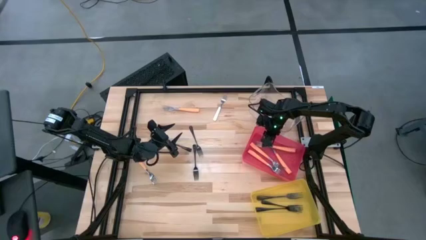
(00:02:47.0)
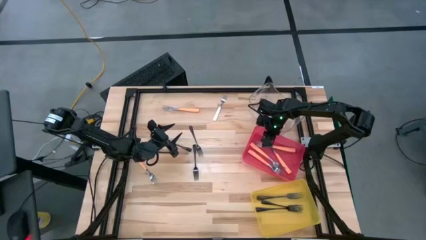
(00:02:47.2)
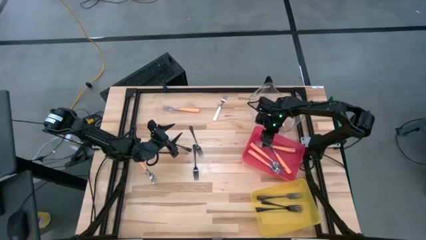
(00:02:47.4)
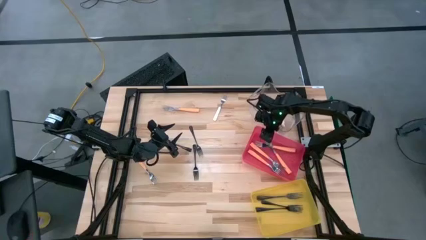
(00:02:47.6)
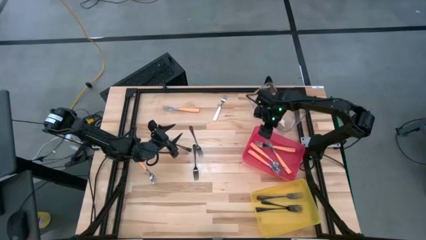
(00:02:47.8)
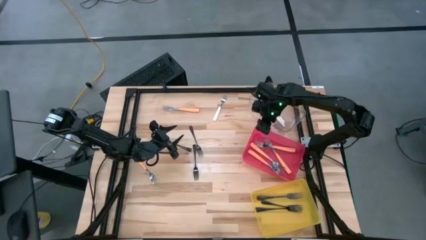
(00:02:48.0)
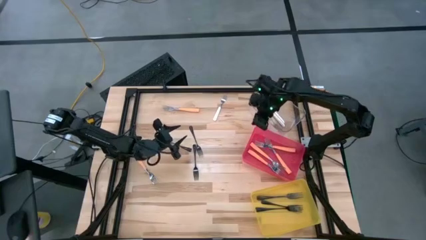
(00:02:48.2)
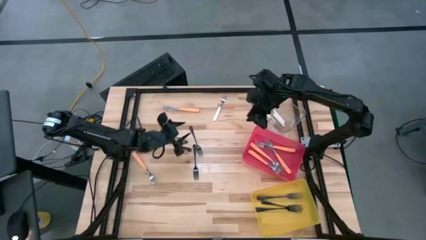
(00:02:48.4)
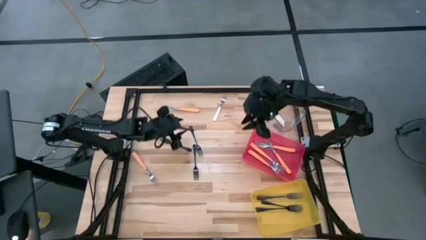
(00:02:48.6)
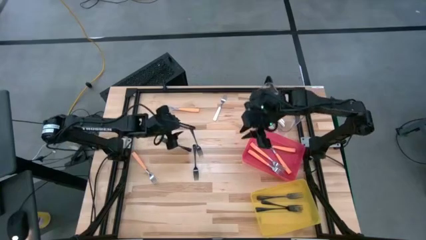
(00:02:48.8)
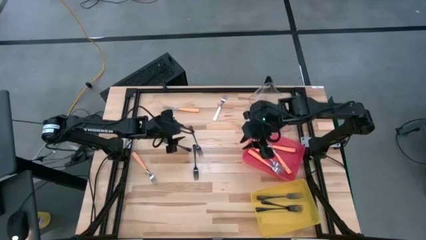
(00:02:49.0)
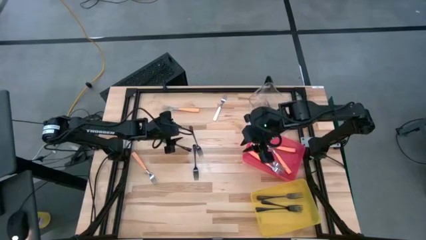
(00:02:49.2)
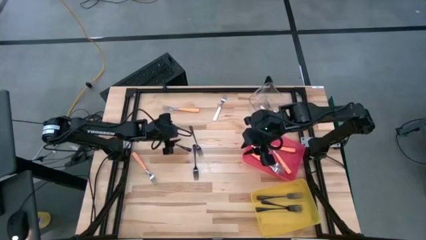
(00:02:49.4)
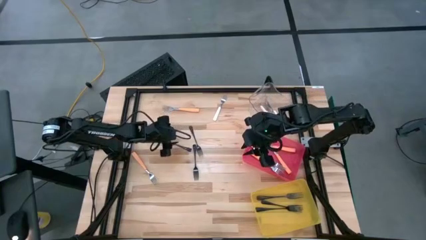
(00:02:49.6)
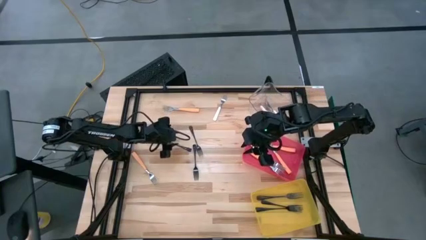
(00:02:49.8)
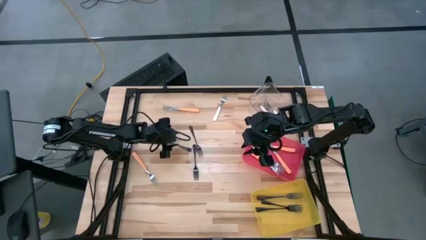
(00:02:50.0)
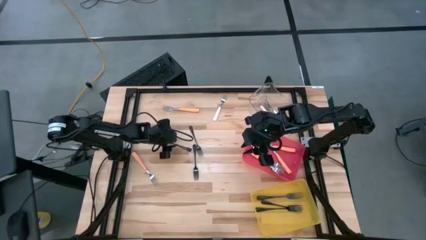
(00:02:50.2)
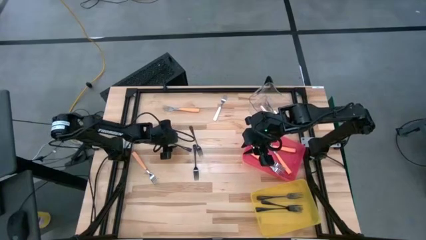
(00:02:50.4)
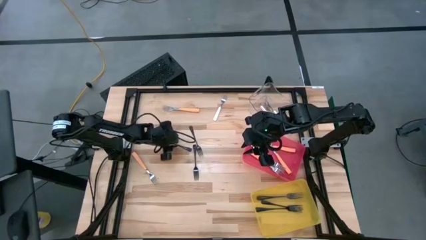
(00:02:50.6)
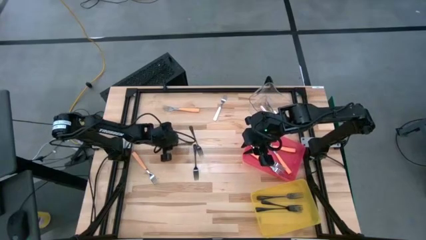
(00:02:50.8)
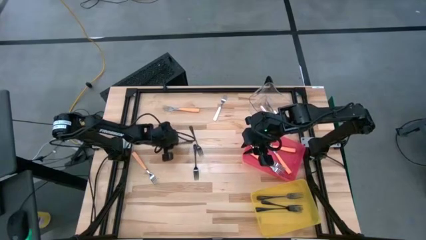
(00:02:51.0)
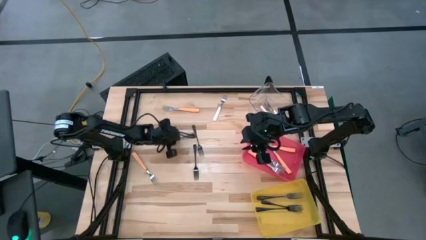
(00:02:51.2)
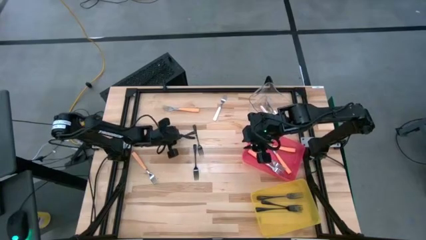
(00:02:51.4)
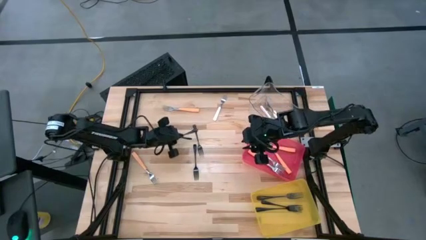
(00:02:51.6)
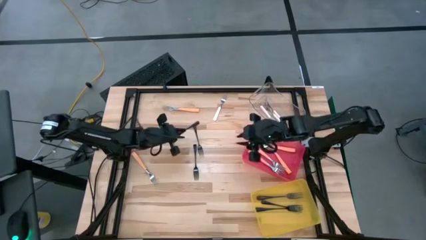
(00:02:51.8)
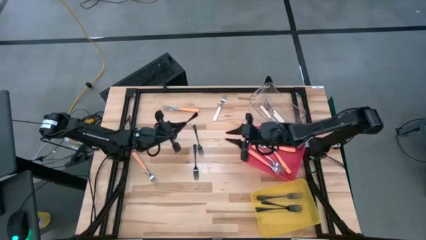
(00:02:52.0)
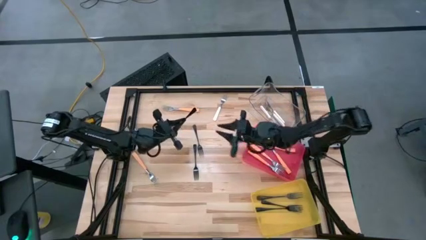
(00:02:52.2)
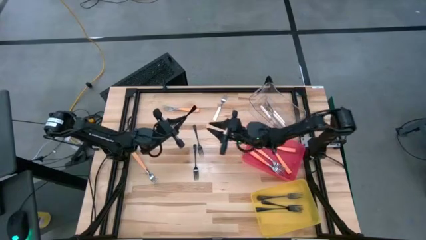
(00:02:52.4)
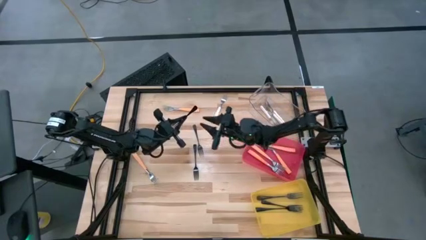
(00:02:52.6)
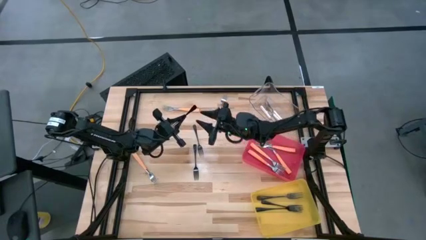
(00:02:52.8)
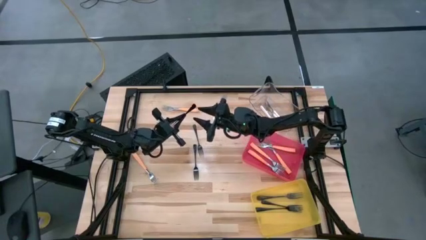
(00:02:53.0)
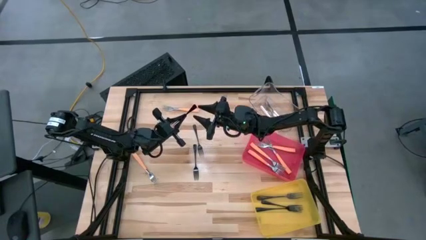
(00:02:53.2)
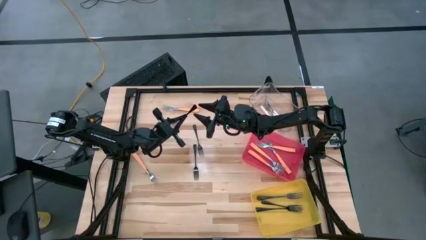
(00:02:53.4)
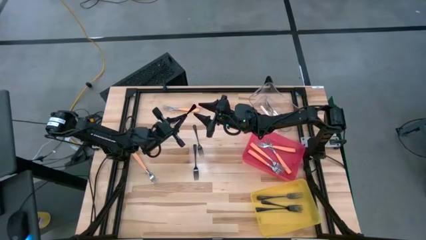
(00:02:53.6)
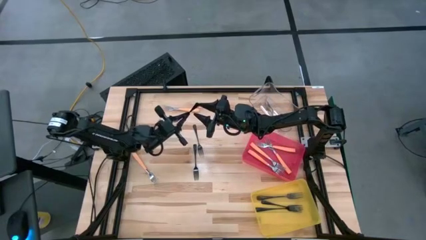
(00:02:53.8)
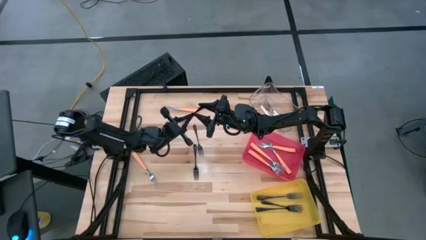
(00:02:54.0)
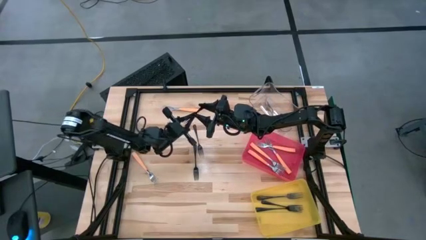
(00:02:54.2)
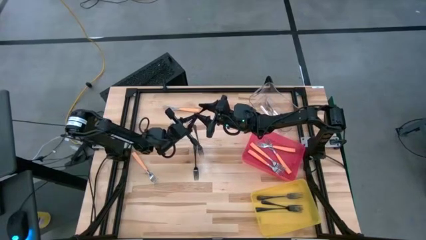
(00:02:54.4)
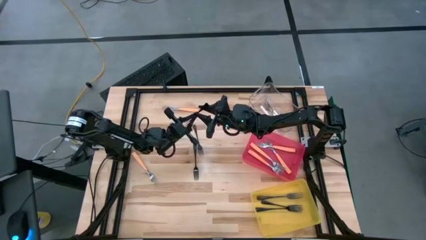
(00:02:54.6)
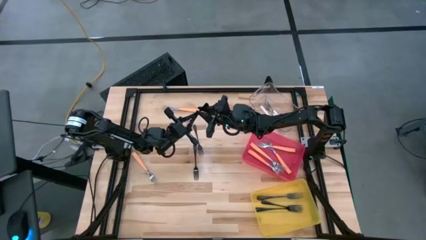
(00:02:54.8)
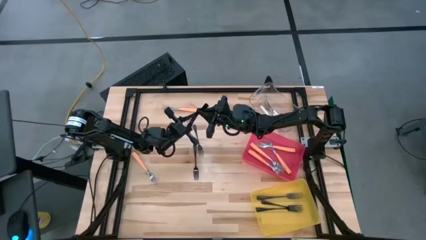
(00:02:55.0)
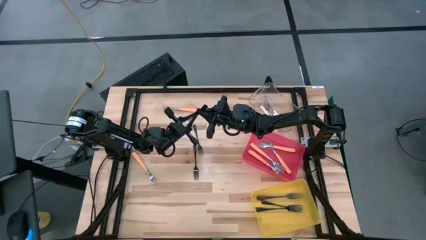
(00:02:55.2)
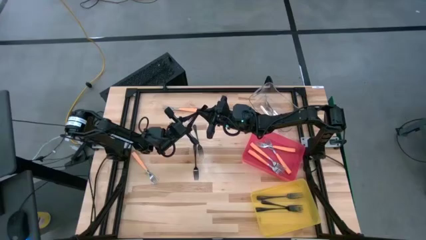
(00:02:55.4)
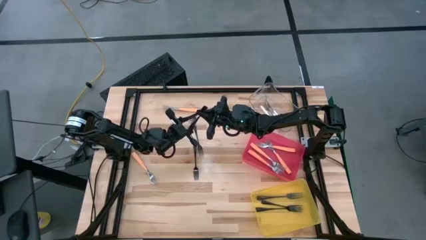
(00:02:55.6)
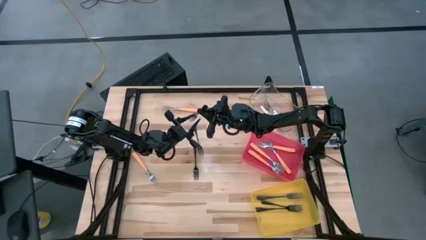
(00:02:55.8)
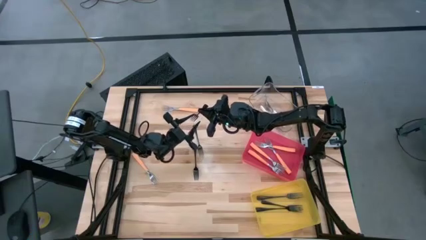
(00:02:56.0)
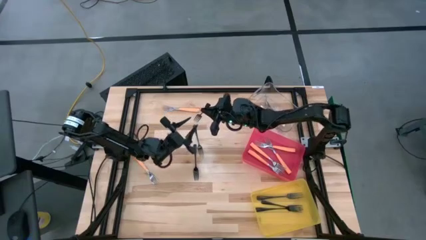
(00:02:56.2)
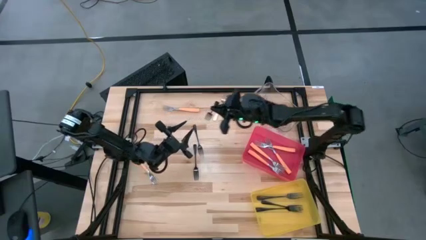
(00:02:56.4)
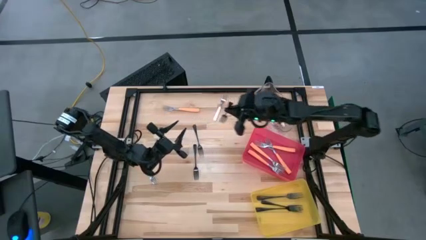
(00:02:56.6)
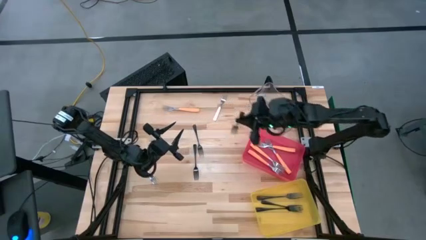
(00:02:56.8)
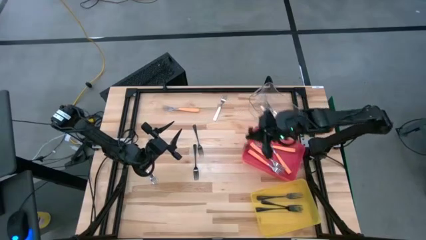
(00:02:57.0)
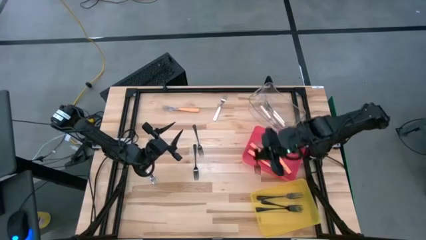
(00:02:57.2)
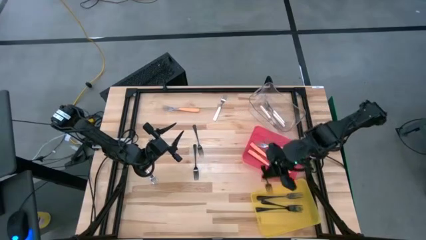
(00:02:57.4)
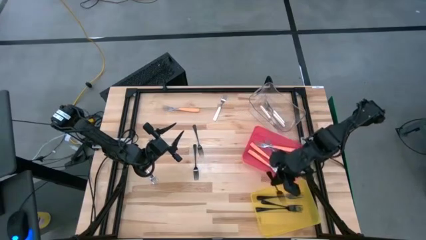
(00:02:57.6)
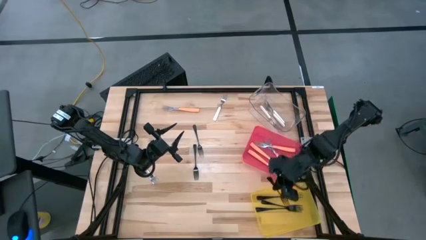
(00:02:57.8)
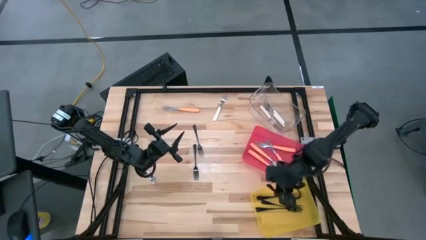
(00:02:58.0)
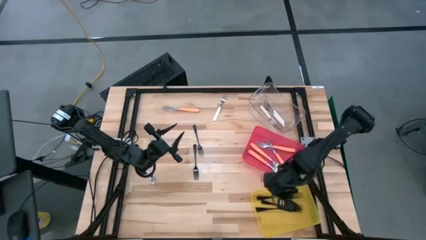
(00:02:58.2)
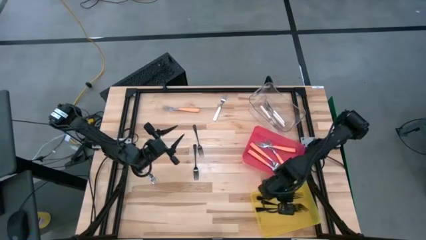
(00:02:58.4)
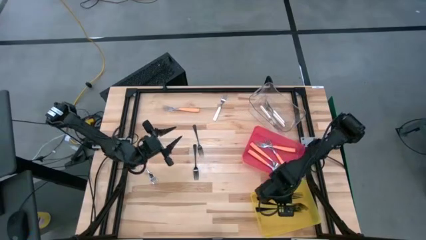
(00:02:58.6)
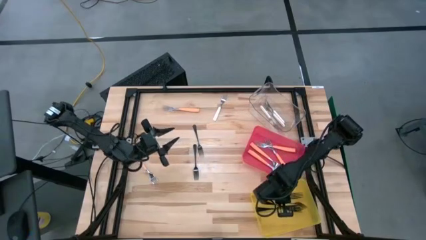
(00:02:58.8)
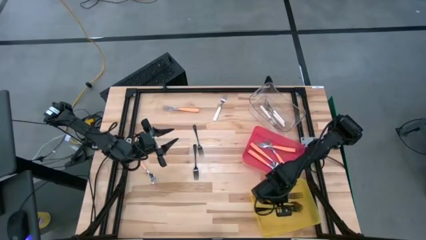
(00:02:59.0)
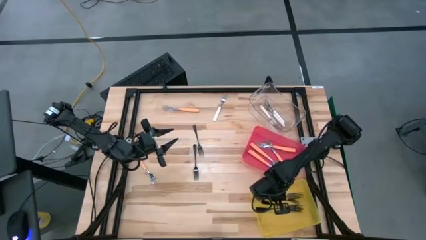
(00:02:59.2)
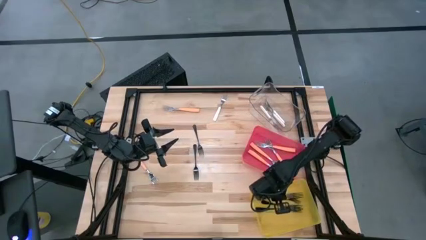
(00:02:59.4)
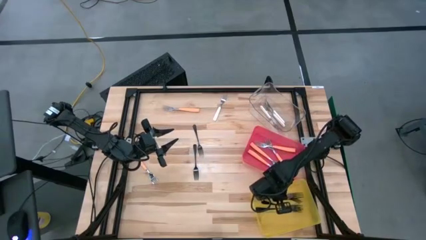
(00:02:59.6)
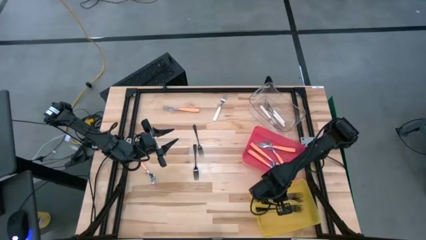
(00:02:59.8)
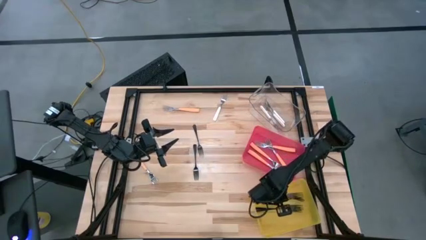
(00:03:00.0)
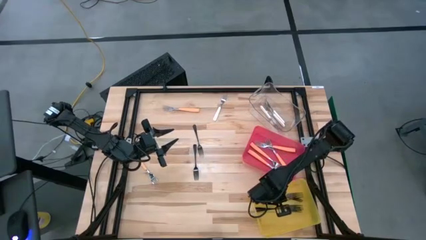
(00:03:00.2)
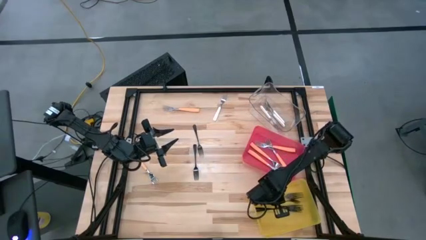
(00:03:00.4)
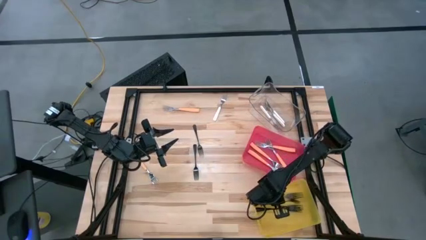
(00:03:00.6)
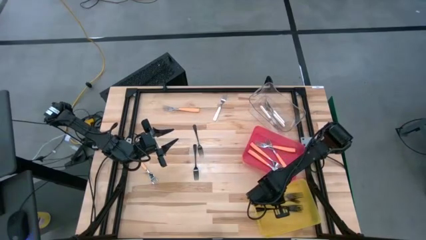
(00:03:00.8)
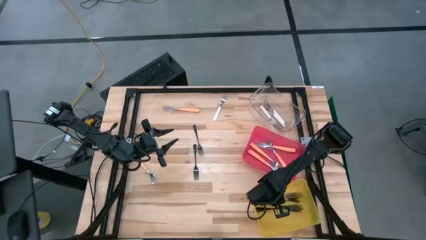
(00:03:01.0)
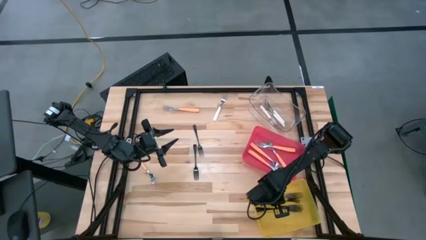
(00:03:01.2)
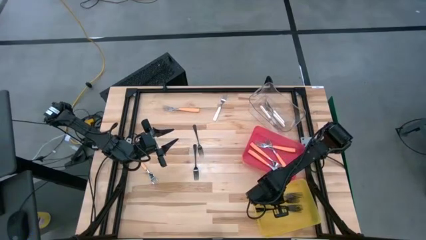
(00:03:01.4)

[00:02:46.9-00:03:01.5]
Task: Sort silverware by color (type)
Put the black fork into the yellow bin

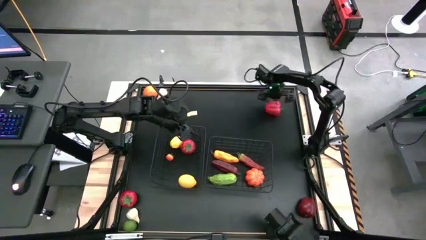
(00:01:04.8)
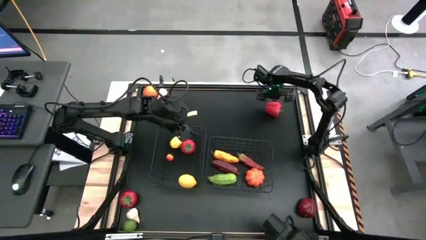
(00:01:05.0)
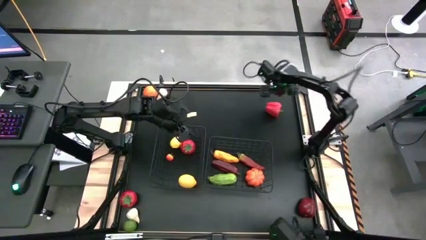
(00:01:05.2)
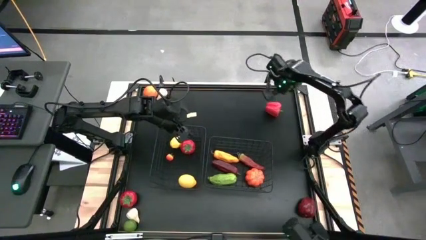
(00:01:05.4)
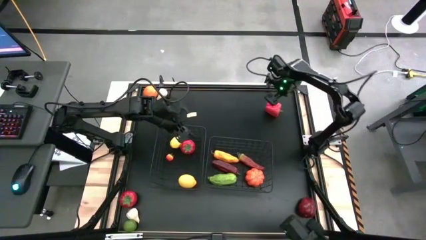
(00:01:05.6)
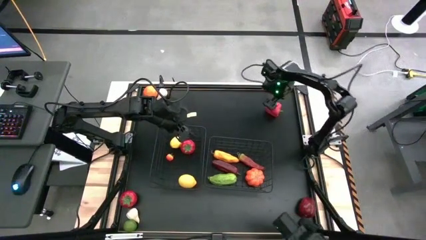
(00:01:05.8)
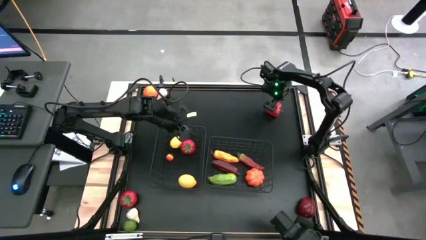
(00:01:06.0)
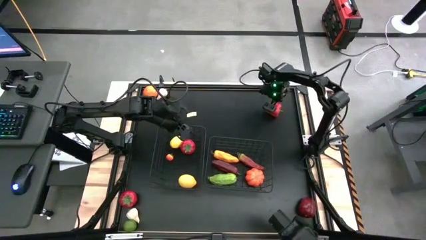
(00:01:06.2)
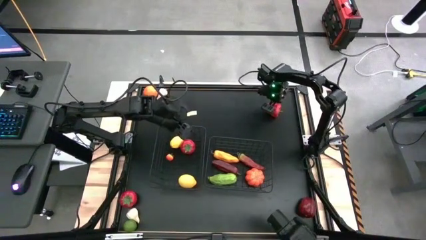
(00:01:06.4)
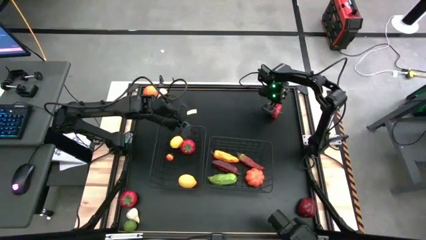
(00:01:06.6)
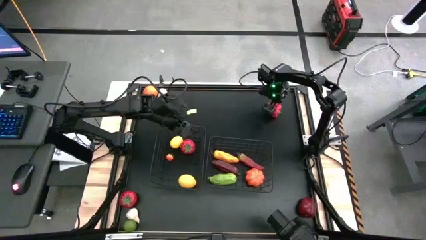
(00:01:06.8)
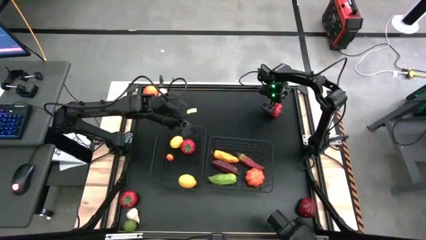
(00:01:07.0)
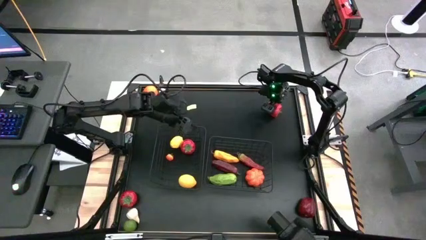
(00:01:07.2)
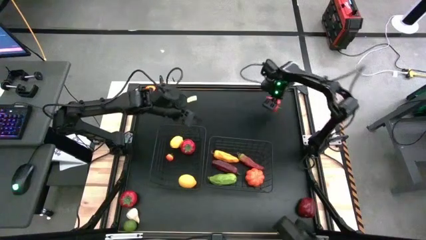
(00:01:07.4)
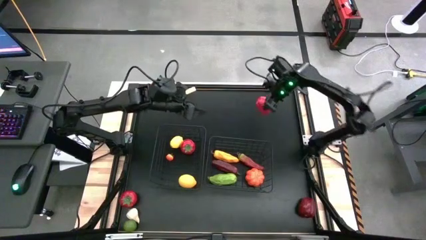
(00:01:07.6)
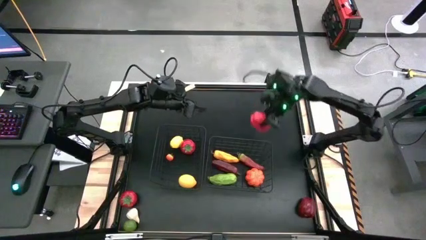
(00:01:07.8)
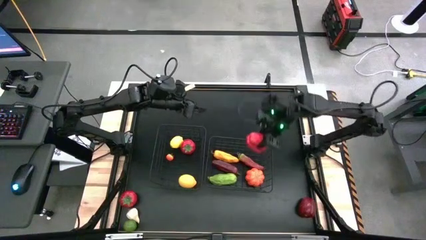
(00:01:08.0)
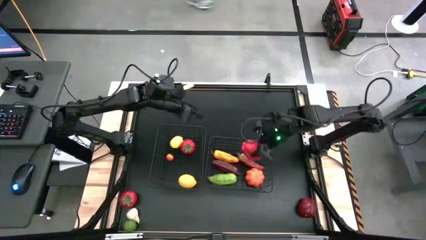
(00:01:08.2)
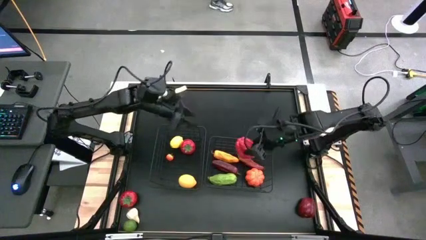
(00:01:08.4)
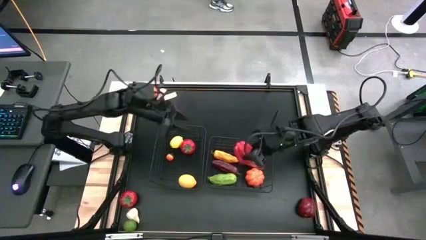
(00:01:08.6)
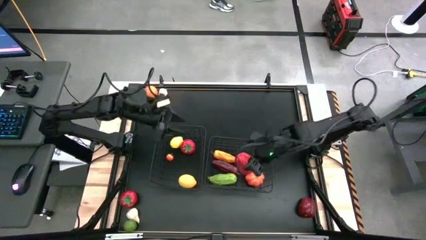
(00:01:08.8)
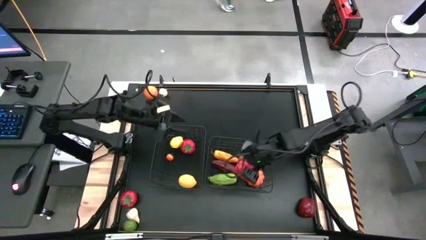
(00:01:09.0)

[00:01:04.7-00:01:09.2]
Task: Sort produce into baskets
Put the red bell pepper into the right wire basket
